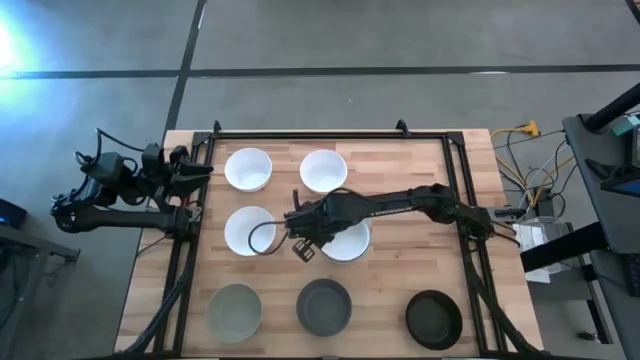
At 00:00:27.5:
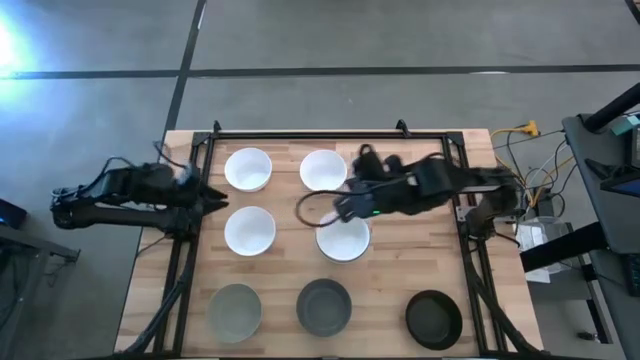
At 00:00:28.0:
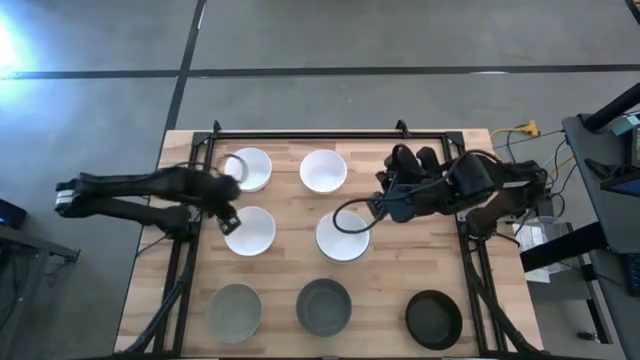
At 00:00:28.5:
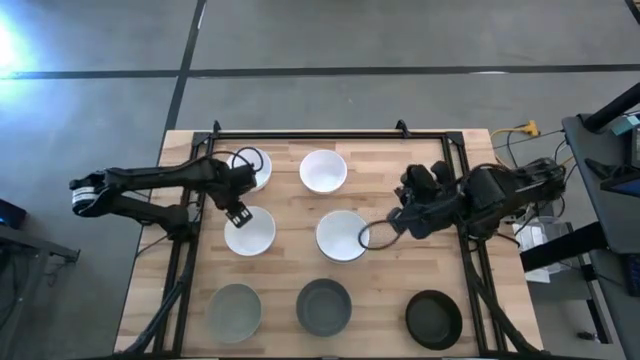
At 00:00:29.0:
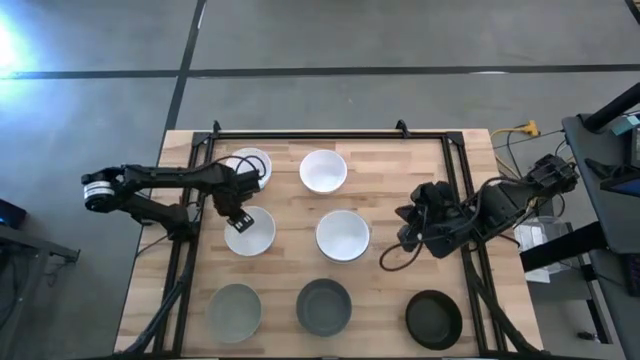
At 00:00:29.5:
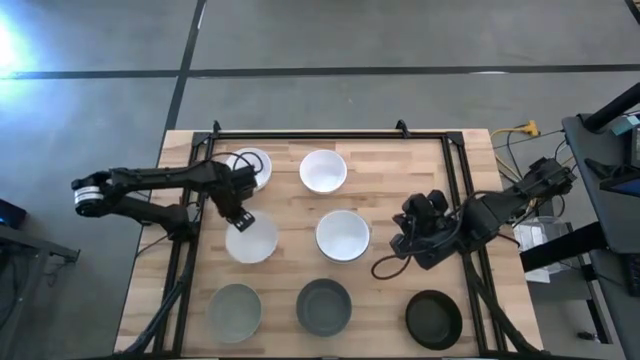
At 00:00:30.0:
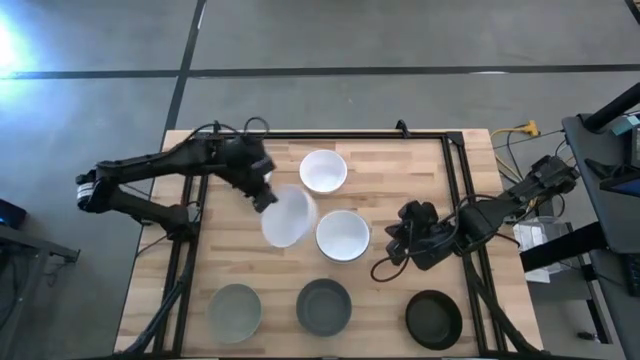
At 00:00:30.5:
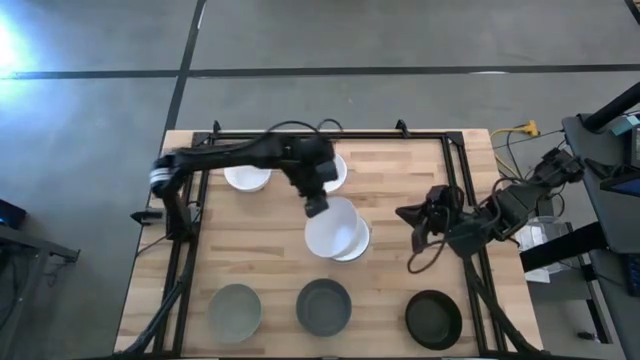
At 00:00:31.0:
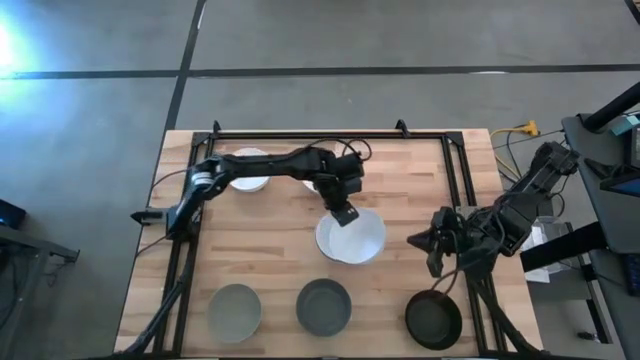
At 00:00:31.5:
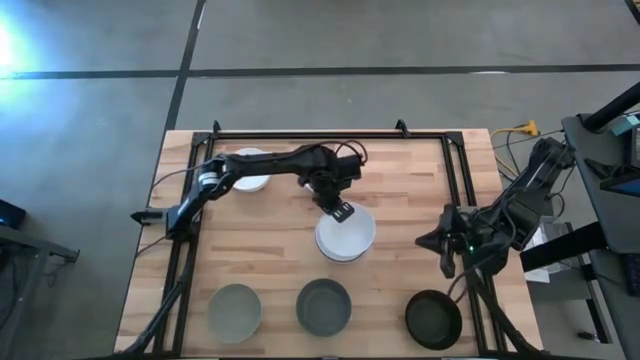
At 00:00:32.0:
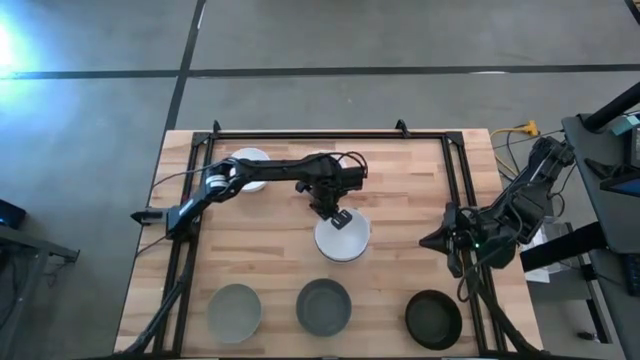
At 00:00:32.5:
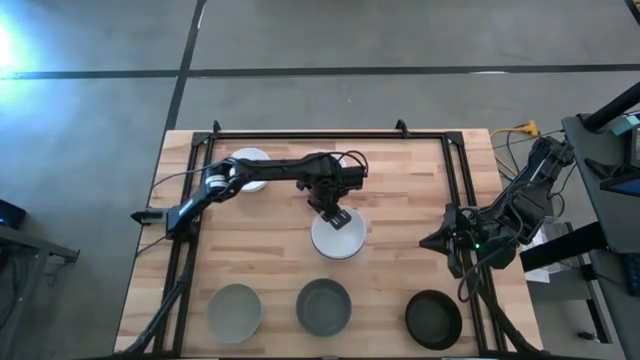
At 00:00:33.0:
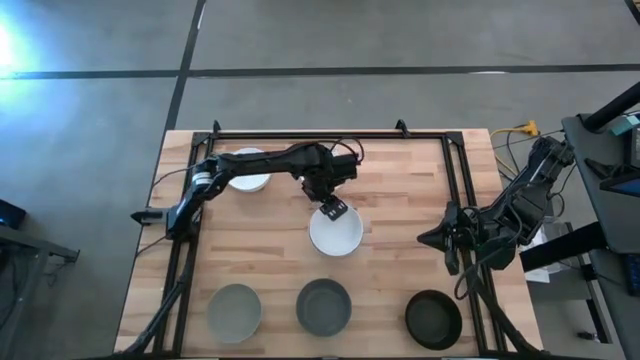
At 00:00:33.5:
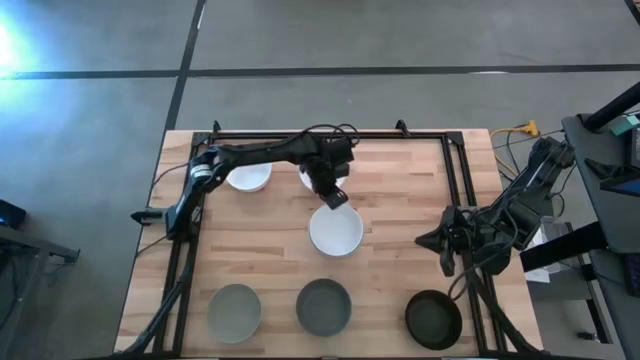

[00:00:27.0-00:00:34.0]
Task: Nest bowls inside each other
Stack the white bowl on top of the white bowl

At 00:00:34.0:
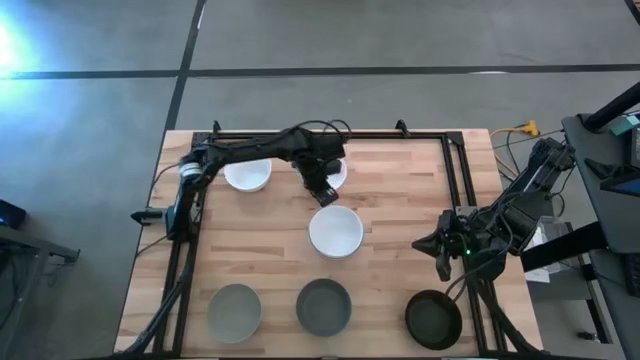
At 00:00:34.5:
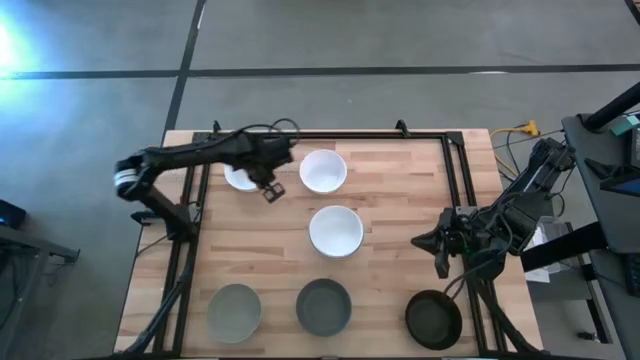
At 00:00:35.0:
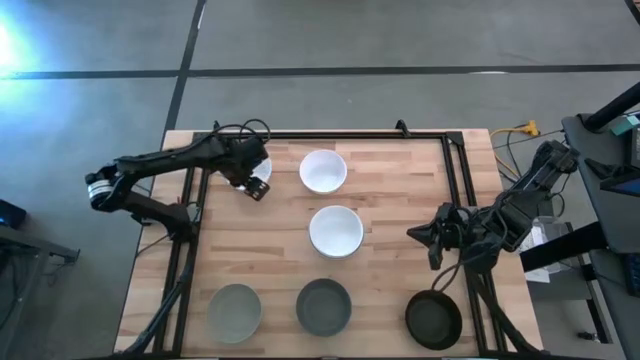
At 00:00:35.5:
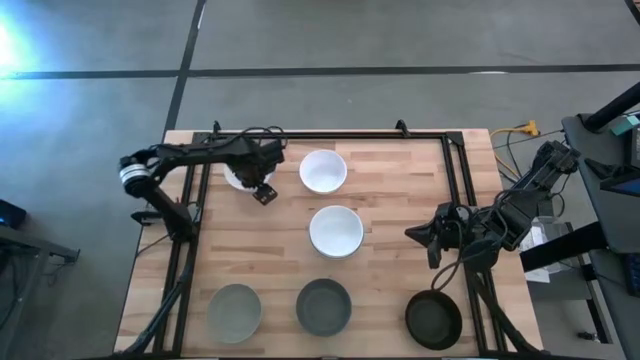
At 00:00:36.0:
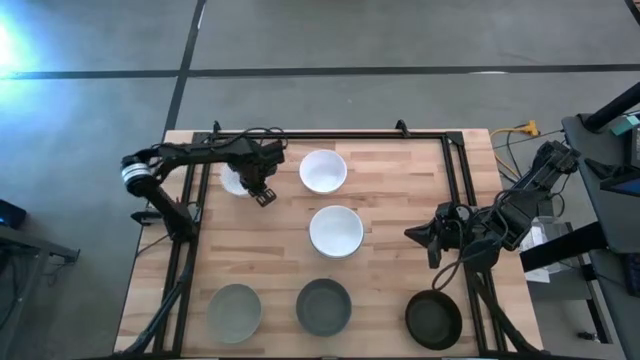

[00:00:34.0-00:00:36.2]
Stack the white bowl on top of the white bowl

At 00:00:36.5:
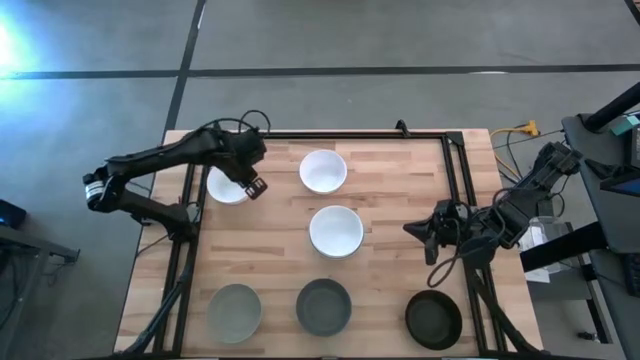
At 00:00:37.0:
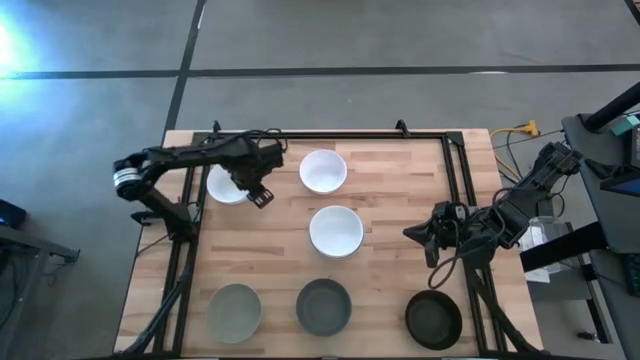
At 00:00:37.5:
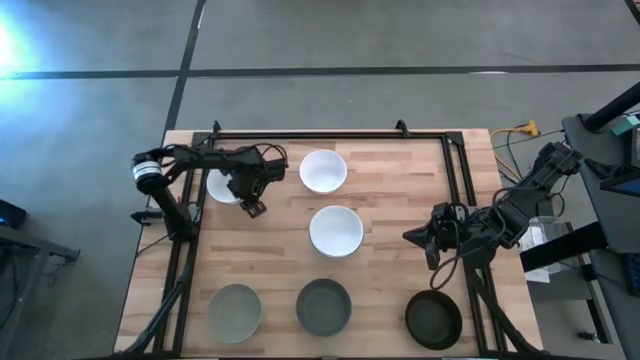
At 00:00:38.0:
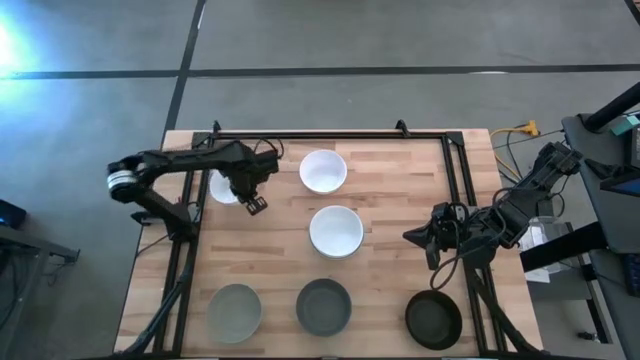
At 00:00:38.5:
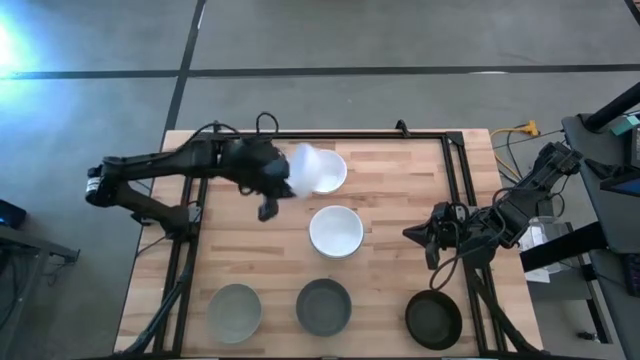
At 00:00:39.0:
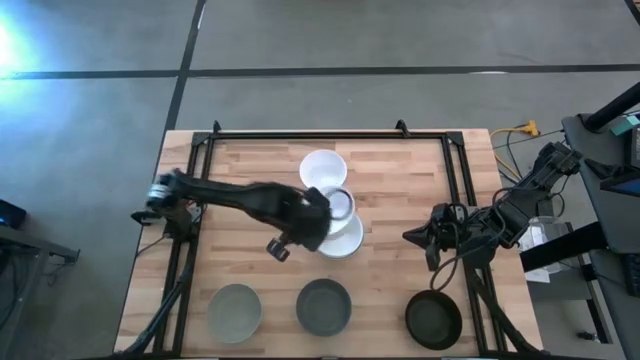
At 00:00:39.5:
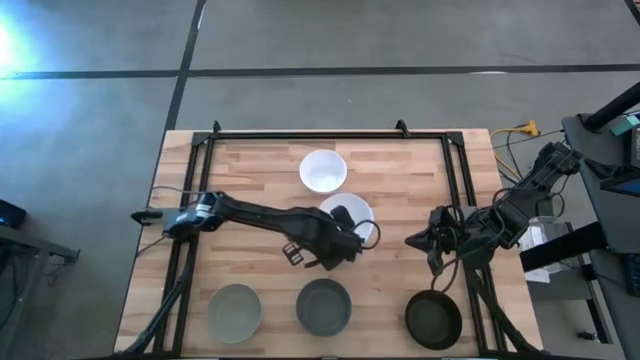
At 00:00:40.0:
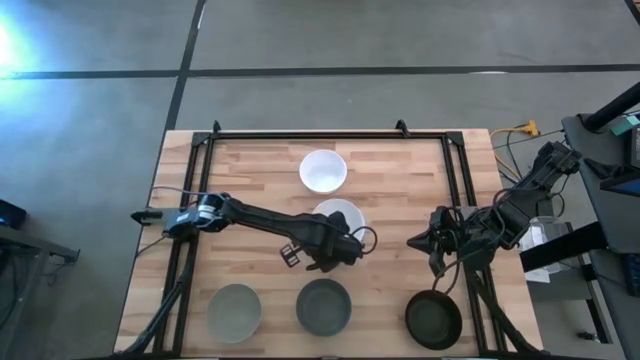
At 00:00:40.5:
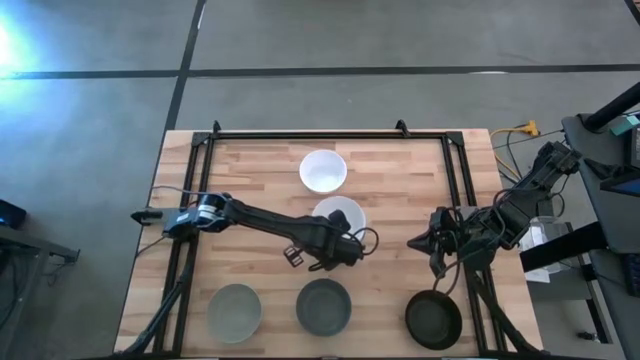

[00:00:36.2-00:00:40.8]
Stack the white bowl on top of the white bowl

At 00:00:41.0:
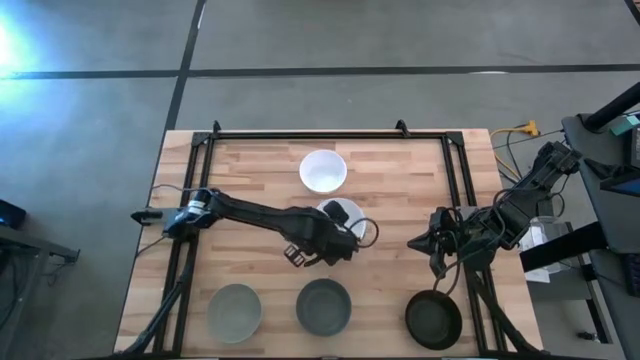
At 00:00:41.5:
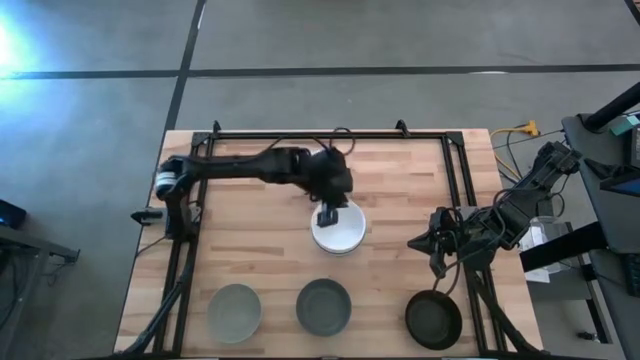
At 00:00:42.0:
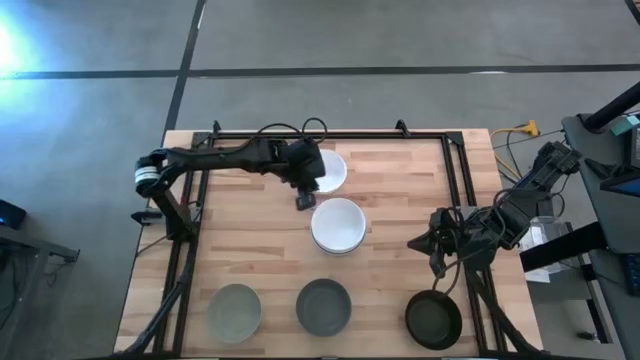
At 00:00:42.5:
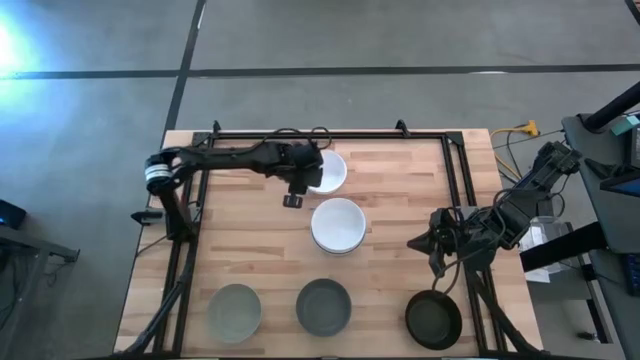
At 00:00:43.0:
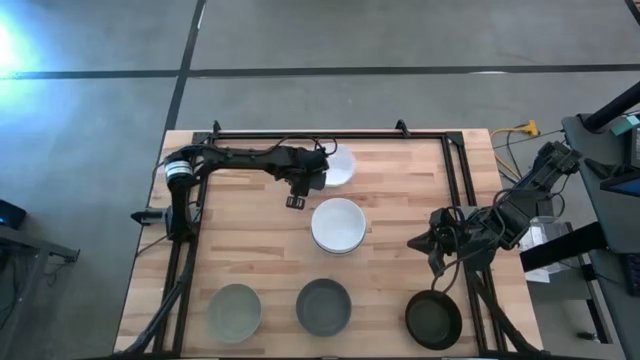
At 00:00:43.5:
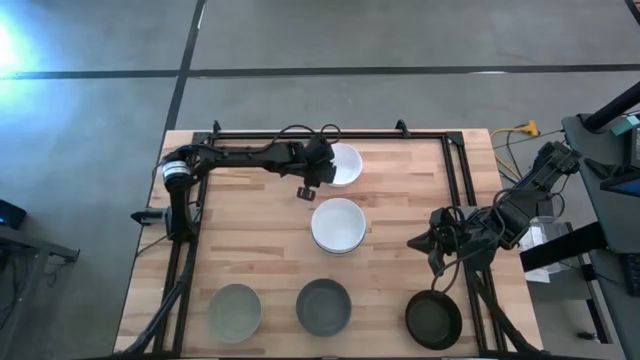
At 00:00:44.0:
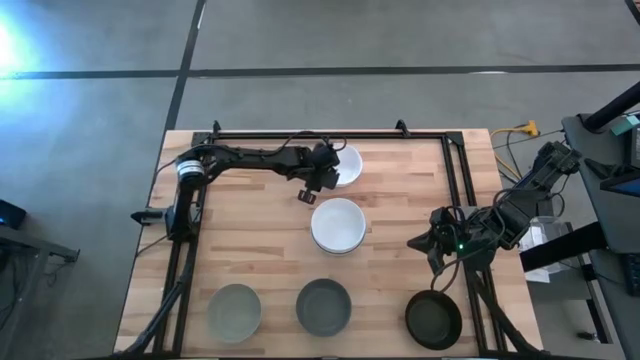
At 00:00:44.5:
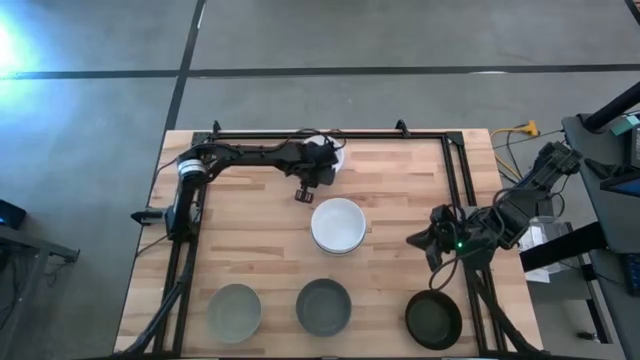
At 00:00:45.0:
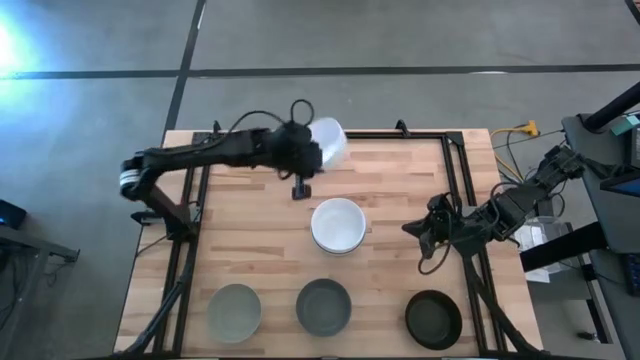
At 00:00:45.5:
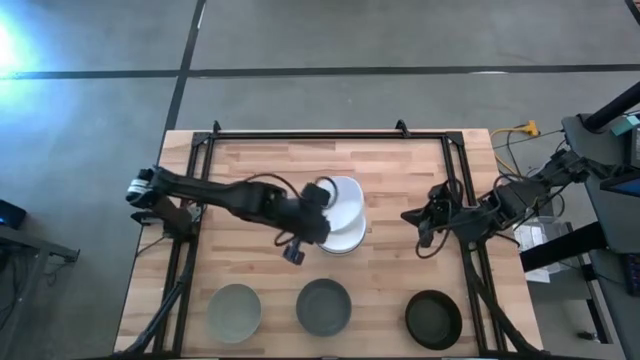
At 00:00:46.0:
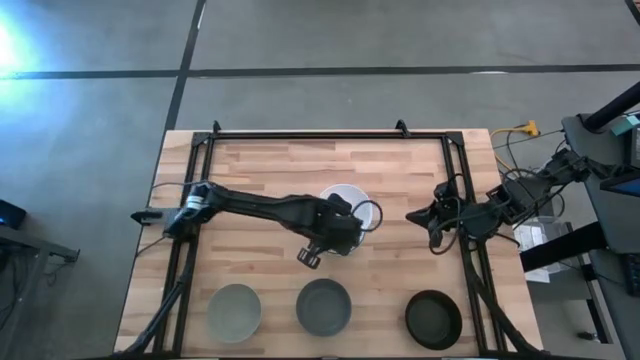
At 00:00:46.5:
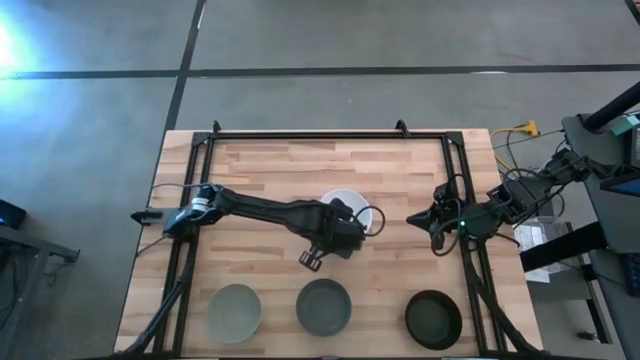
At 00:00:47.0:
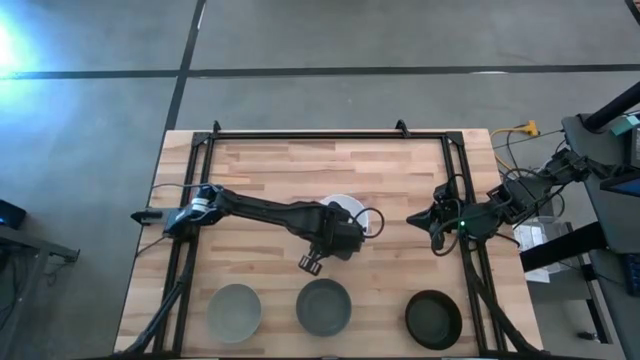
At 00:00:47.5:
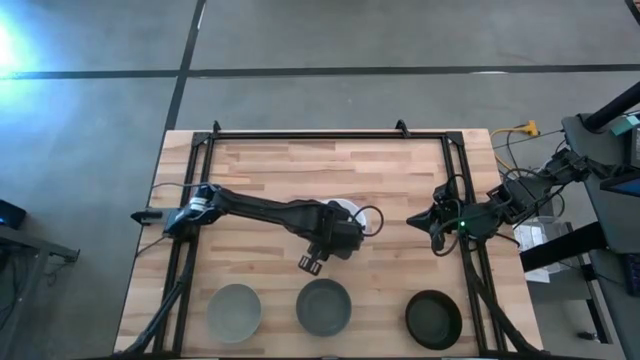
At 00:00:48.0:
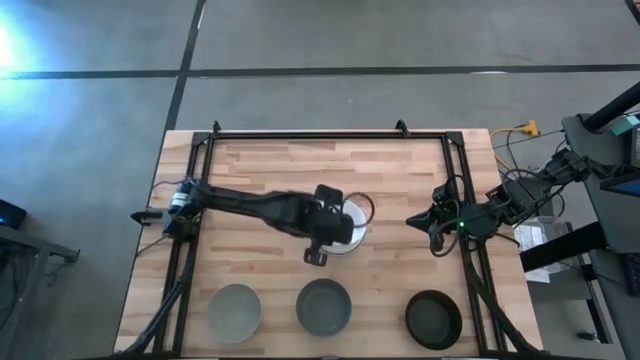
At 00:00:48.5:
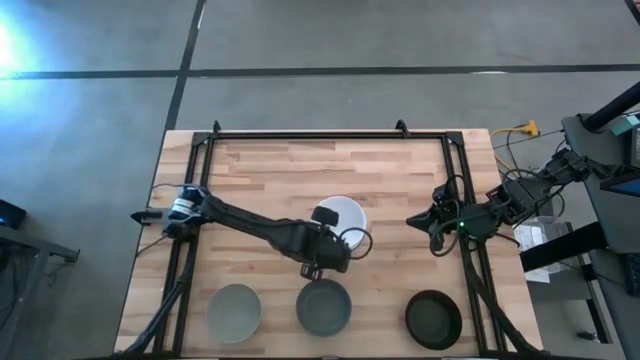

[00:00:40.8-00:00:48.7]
Stack the white bowl on top of the white bowl
